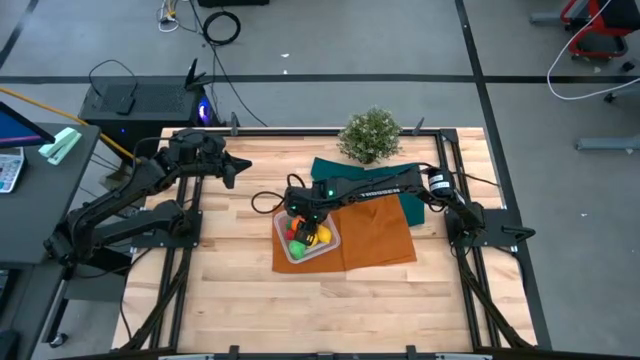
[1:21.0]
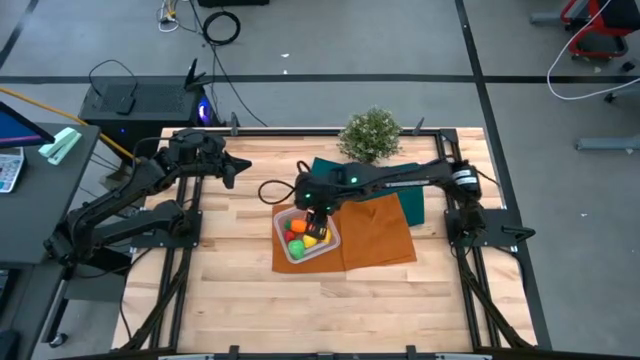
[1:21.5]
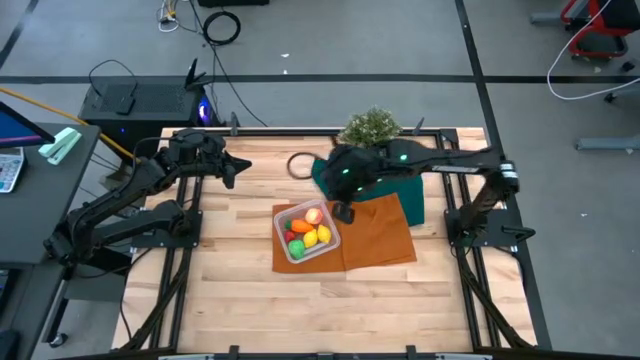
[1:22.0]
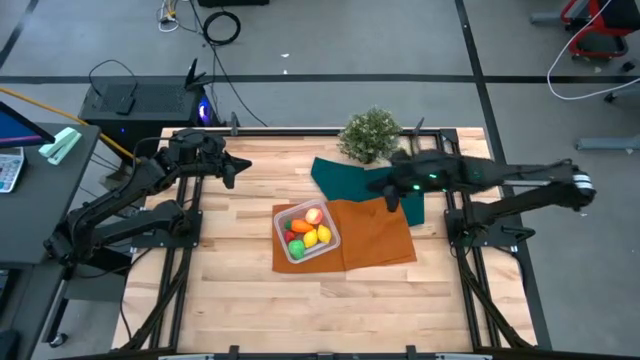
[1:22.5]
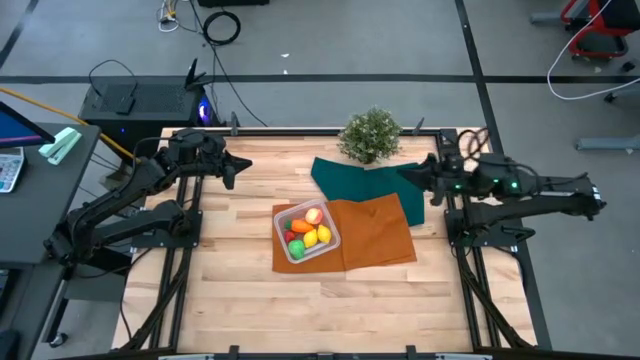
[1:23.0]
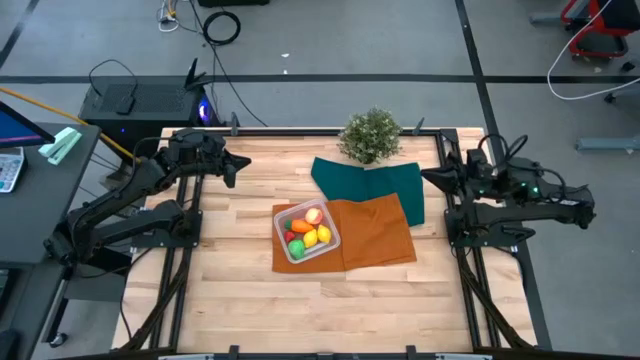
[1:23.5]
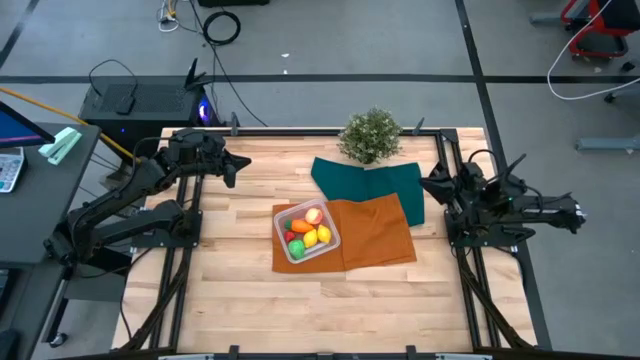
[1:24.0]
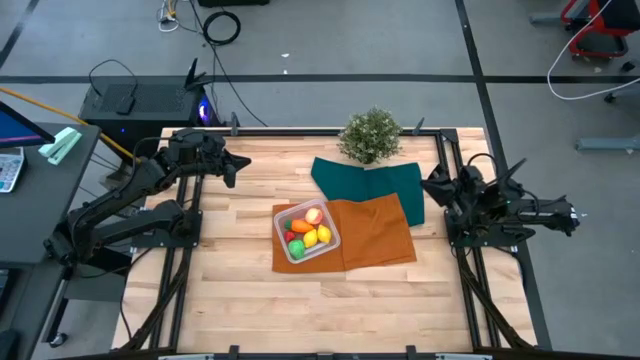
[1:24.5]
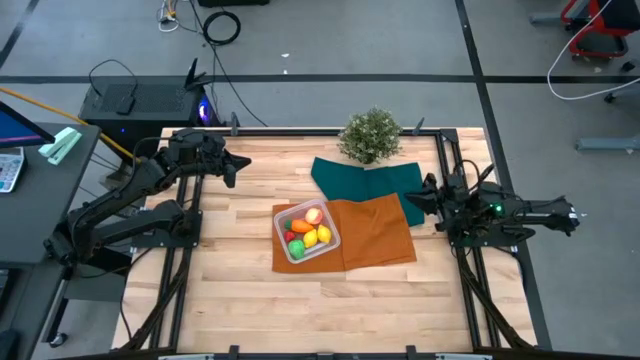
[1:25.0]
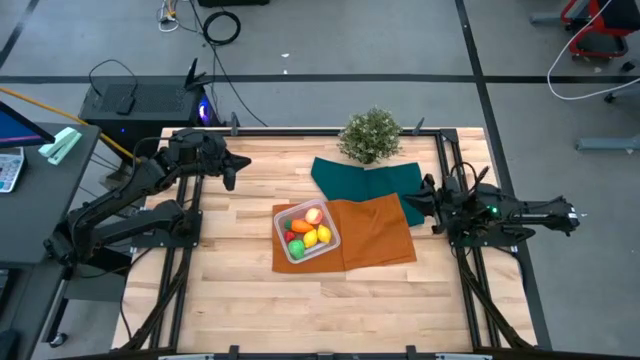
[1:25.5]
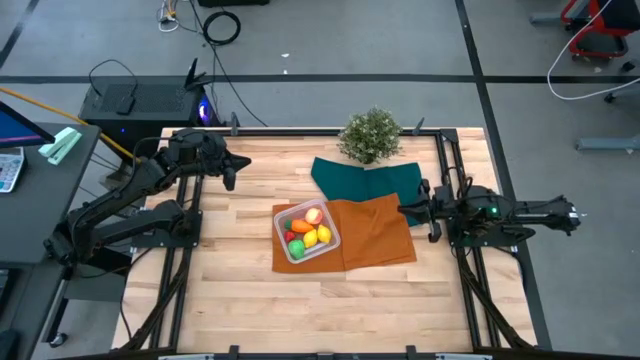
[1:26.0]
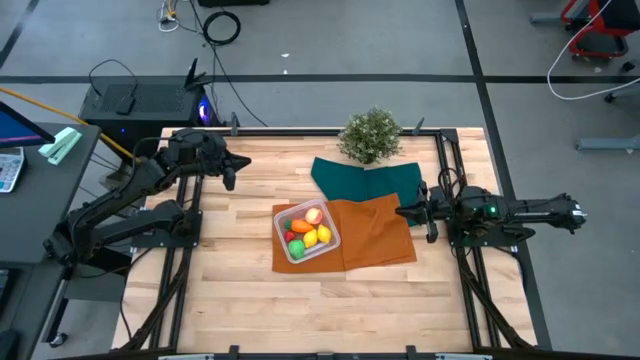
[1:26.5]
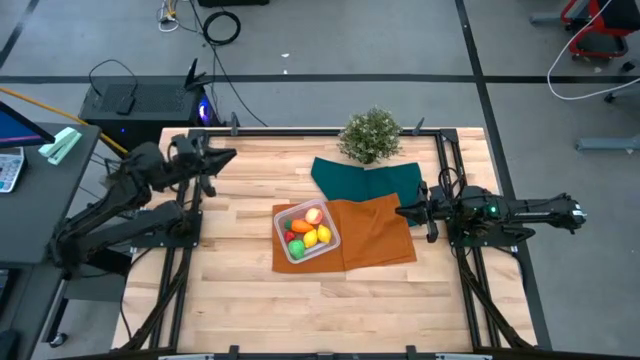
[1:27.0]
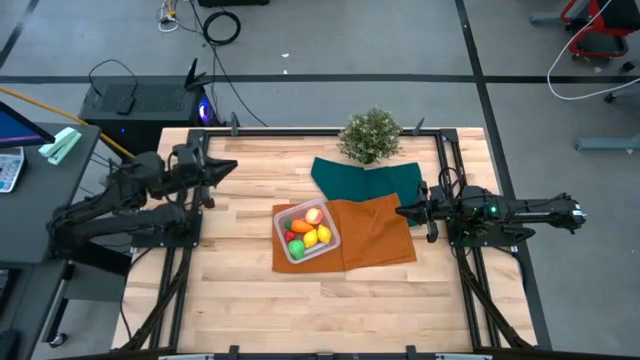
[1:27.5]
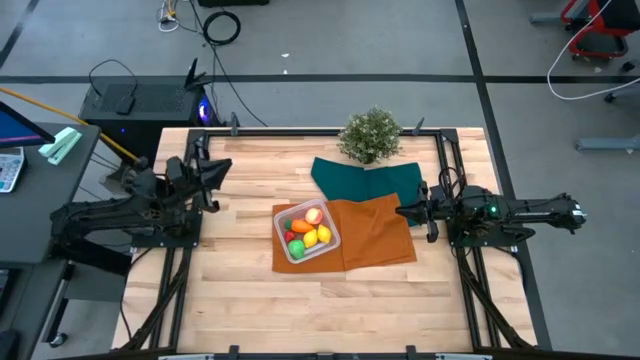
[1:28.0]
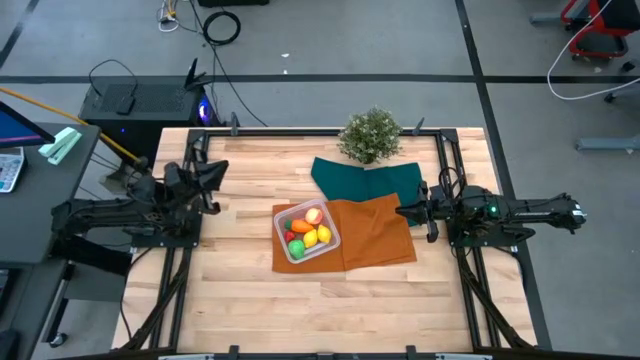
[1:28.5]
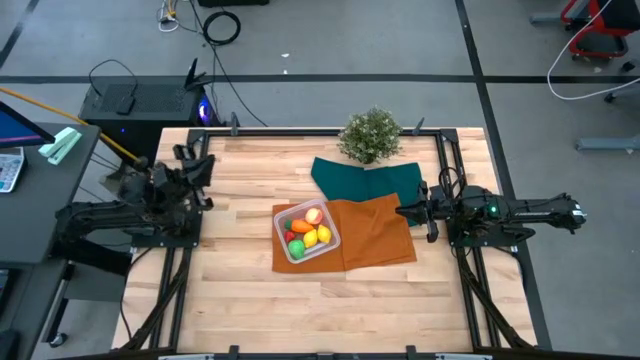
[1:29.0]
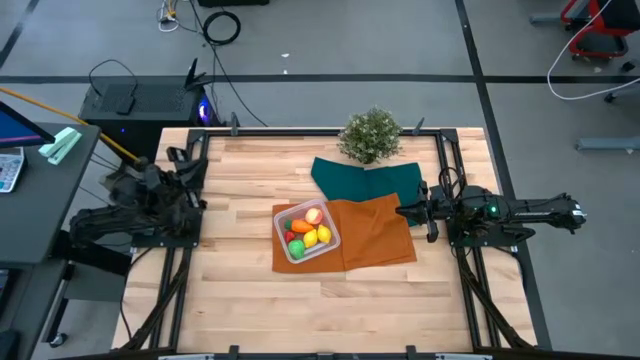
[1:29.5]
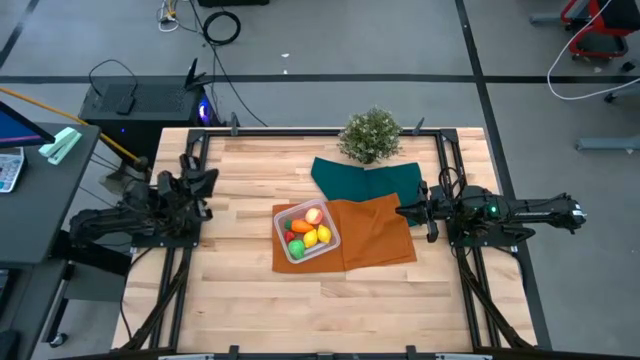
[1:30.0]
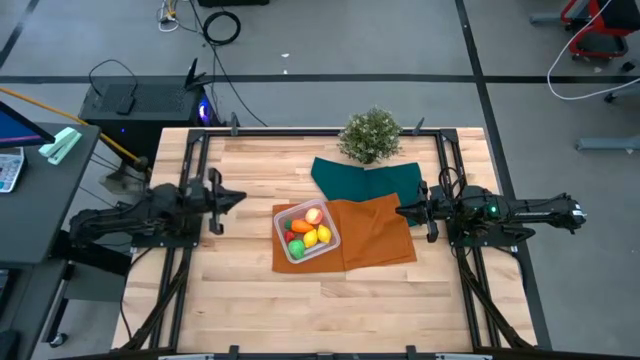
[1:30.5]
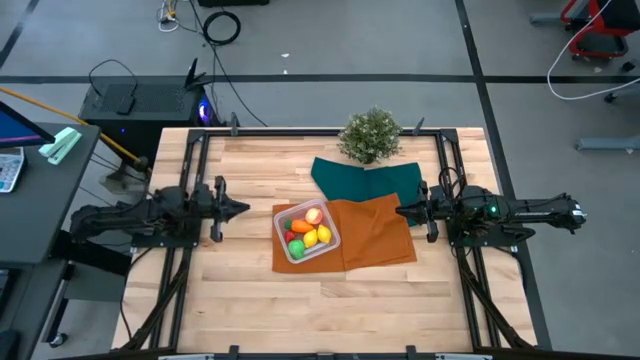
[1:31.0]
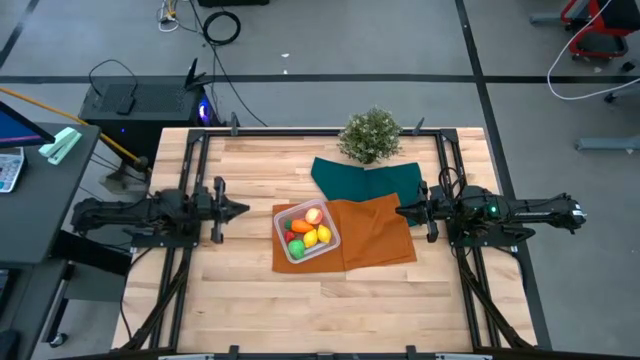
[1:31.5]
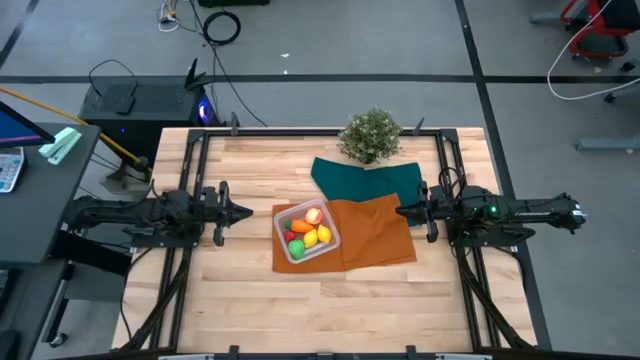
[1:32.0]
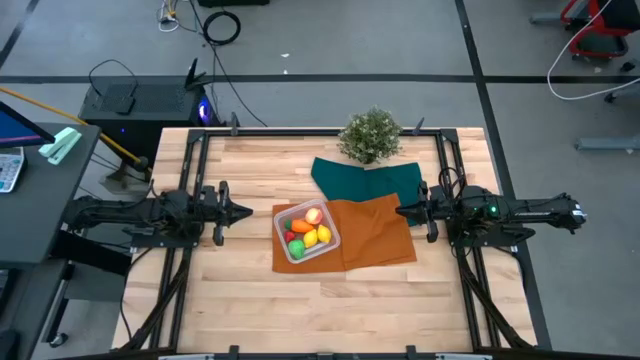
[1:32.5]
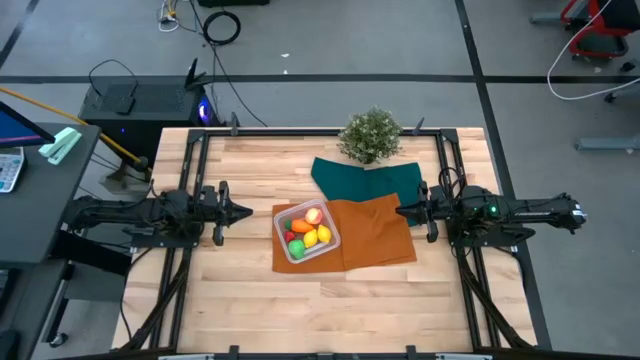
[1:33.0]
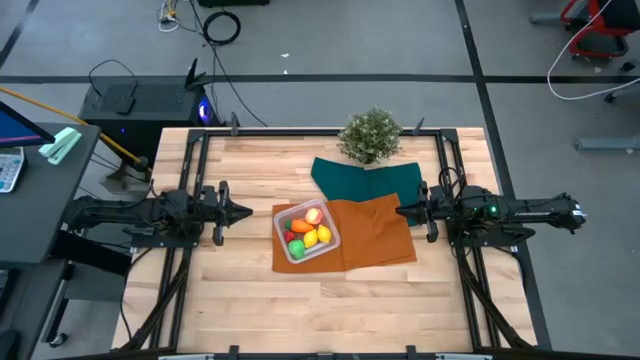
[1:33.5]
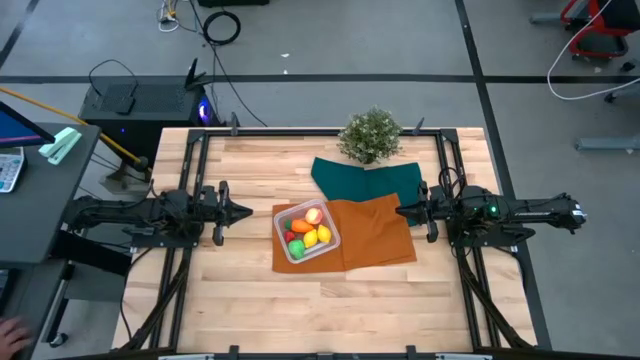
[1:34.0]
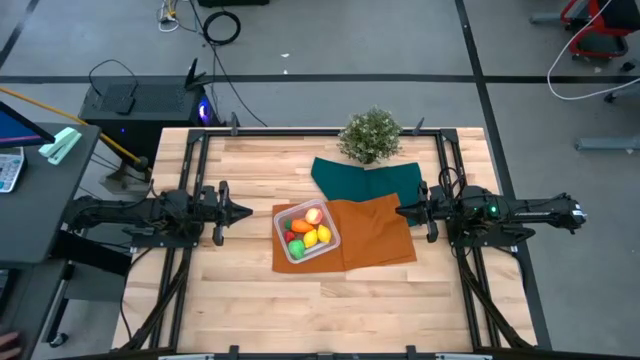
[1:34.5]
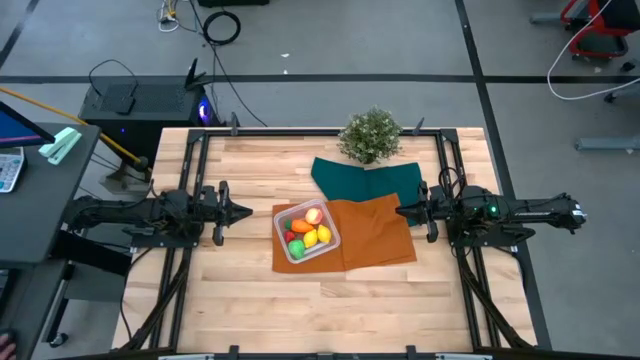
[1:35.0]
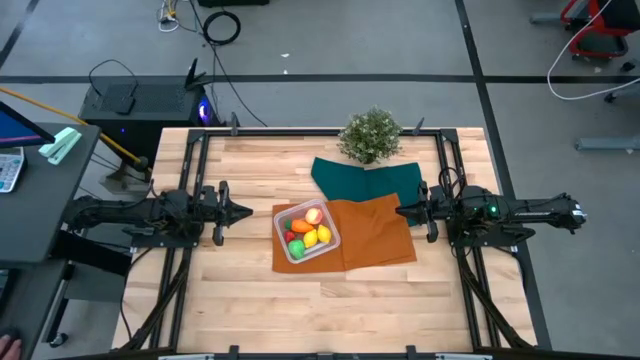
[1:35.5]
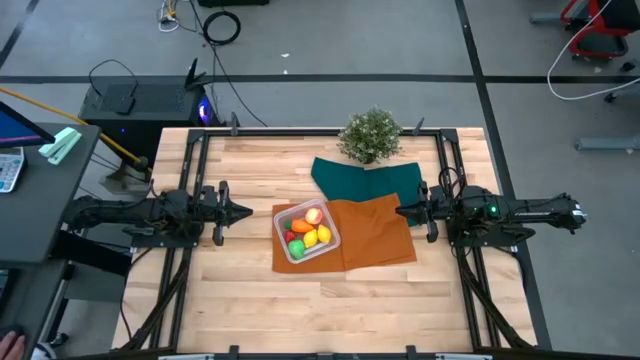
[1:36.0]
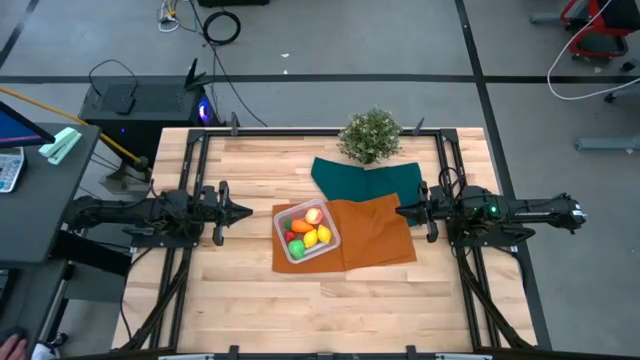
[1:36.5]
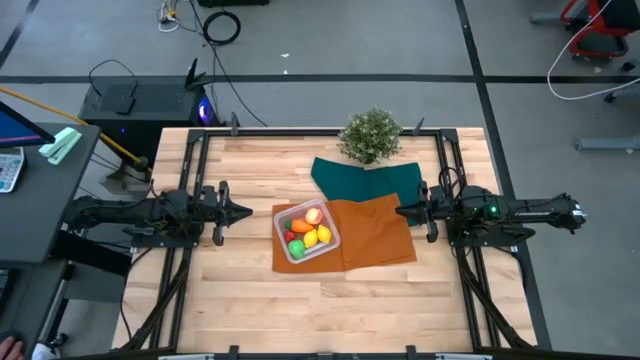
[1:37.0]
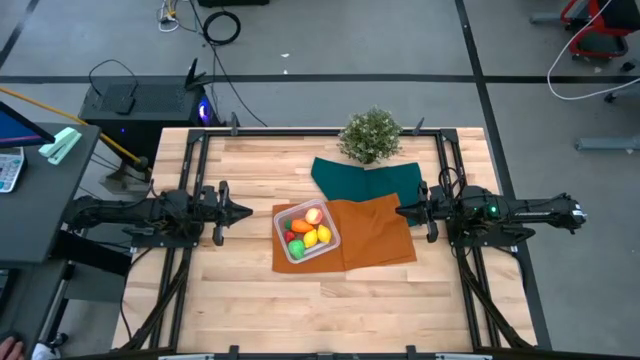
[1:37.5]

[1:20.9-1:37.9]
Task: Pick and placing Produce into tupperware
Return to Home Position

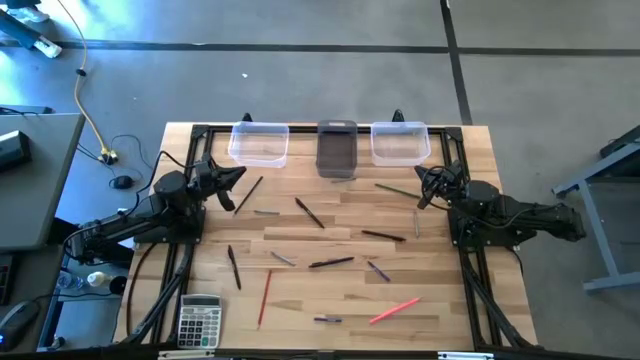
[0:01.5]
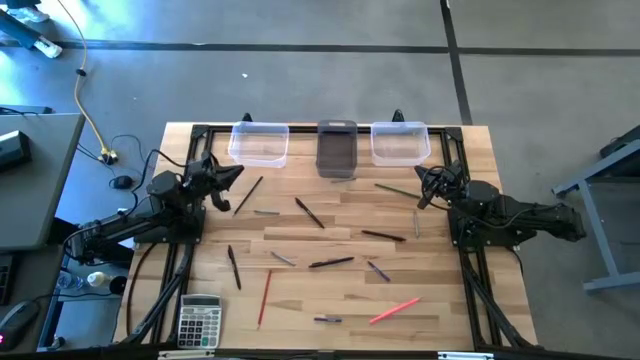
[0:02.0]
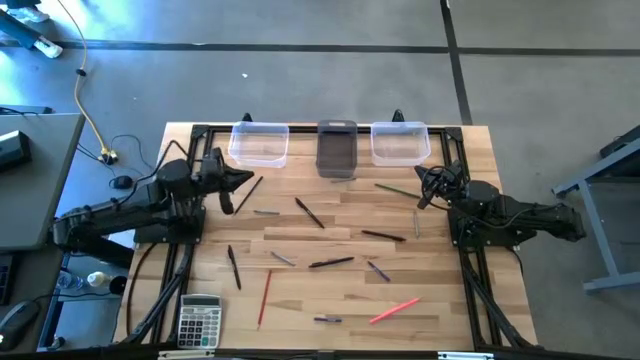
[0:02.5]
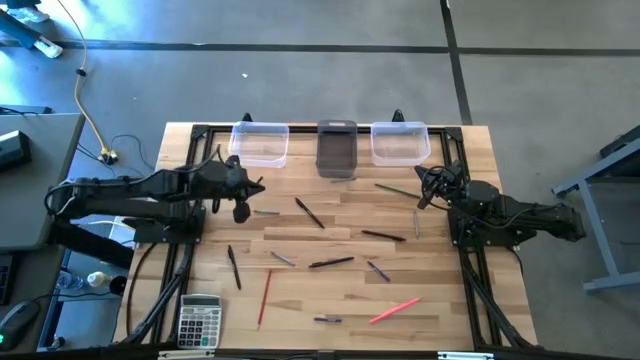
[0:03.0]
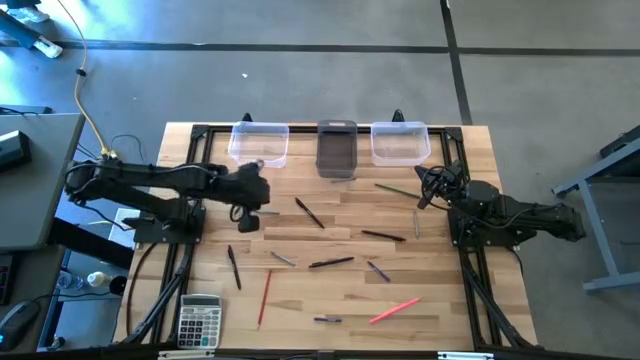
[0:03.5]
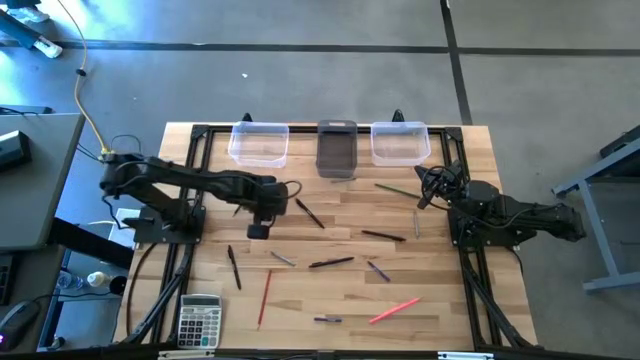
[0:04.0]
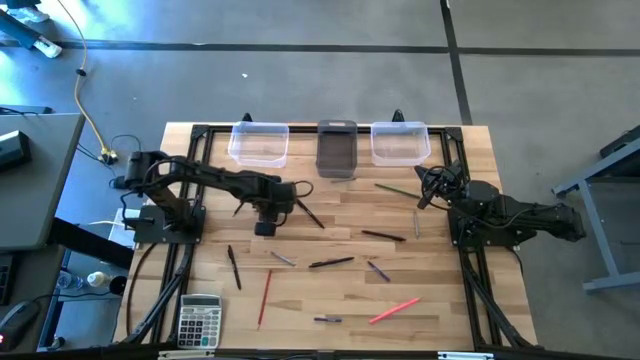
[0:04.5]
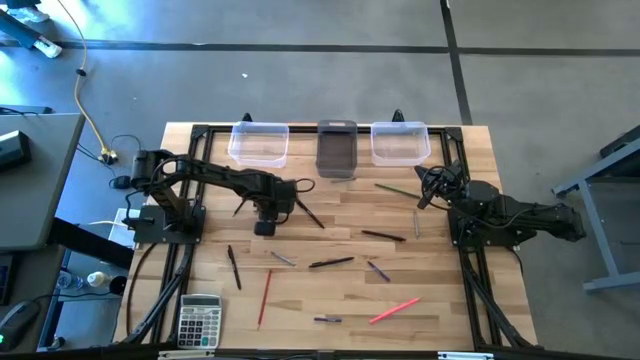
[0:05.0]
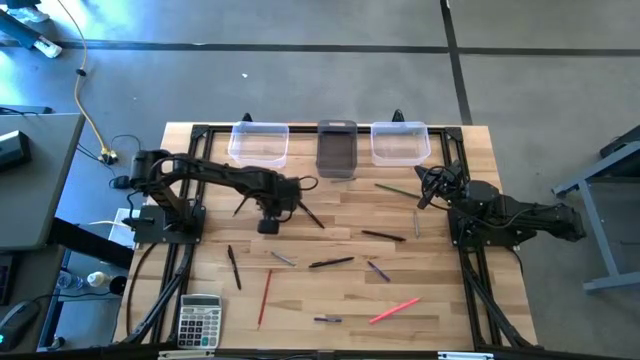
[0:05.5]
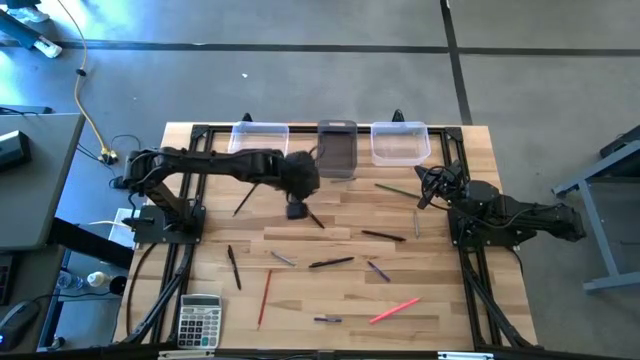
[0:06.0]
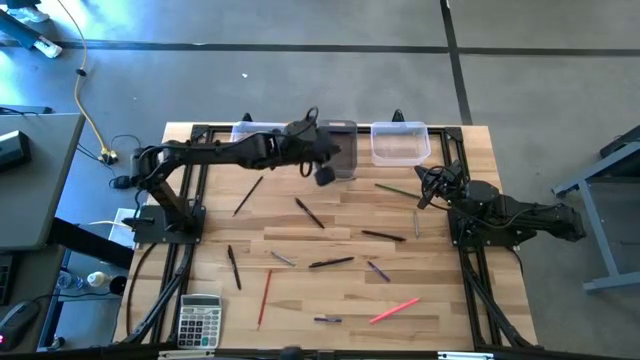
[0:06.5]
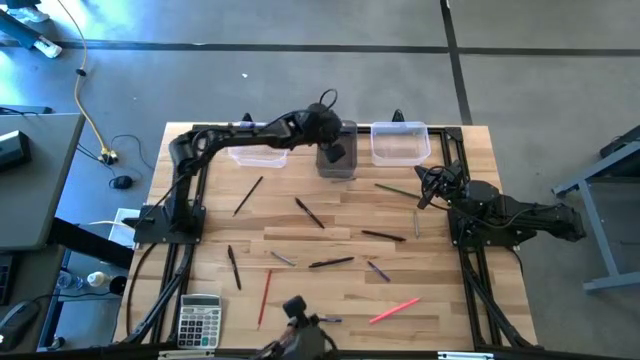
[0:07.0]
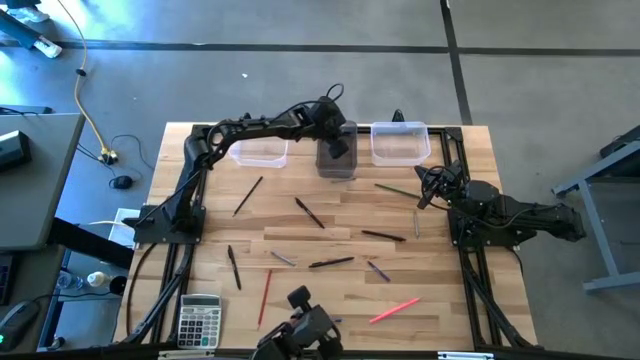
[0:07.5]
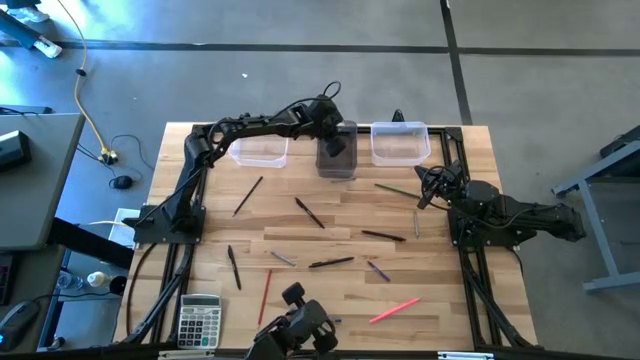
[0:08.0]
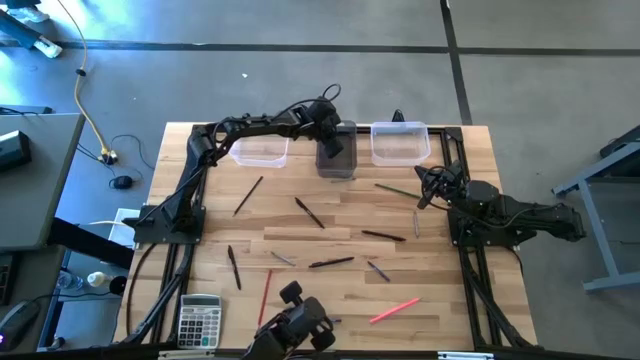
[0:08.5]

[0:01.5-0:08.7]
Task: Sort crayons/erasers/pens/pencils in bins
Put the gray crayon into the black bin
